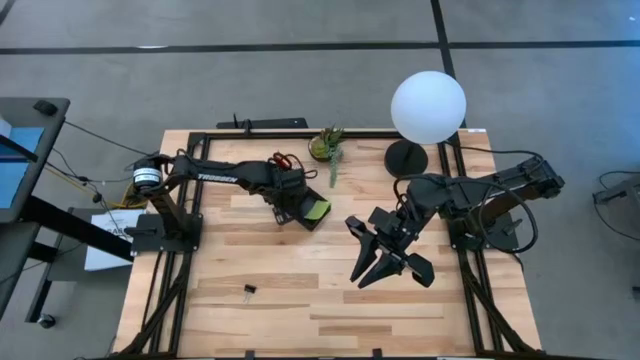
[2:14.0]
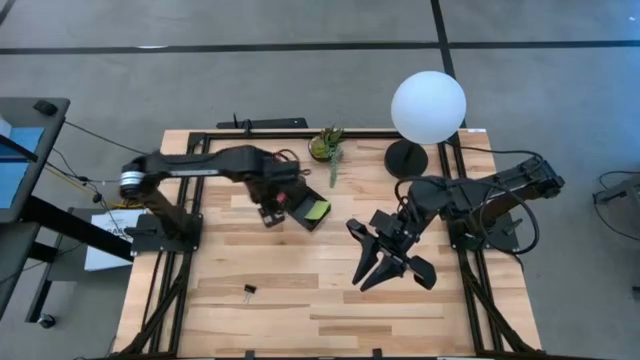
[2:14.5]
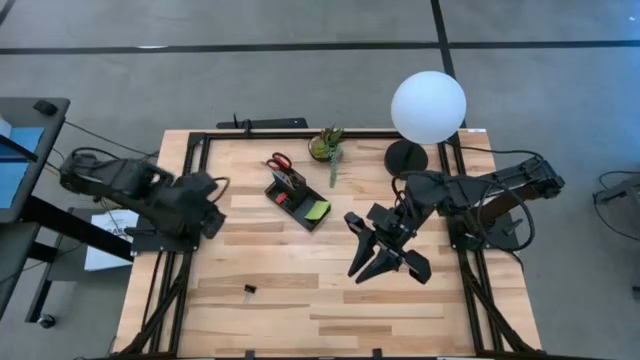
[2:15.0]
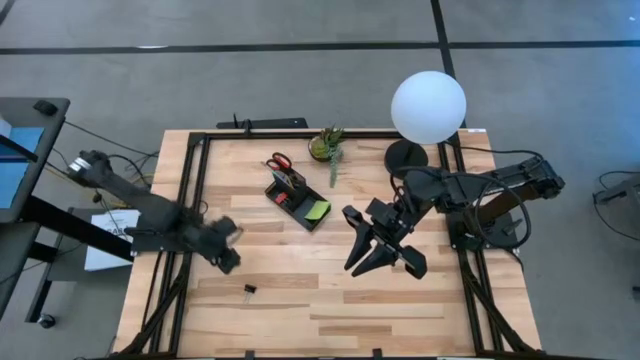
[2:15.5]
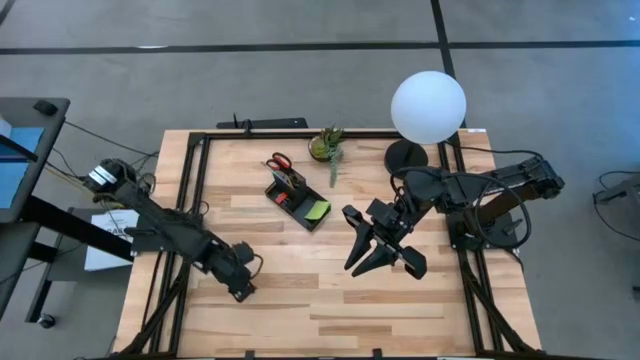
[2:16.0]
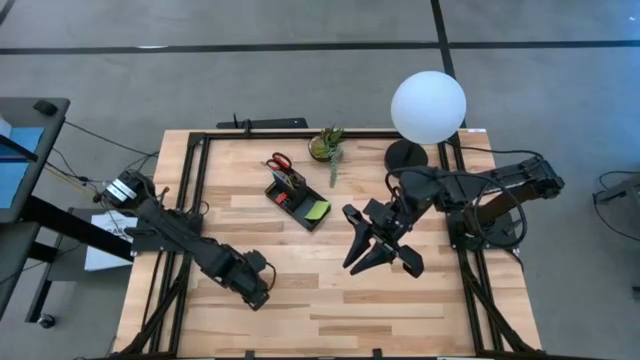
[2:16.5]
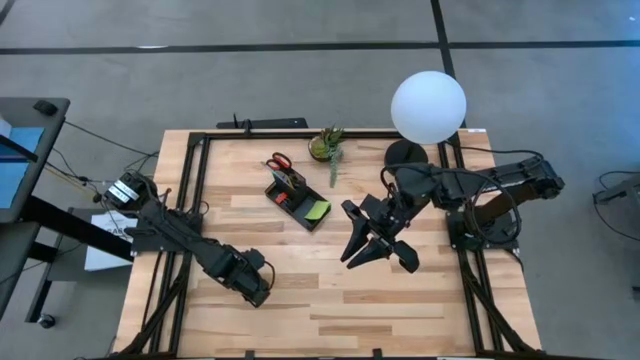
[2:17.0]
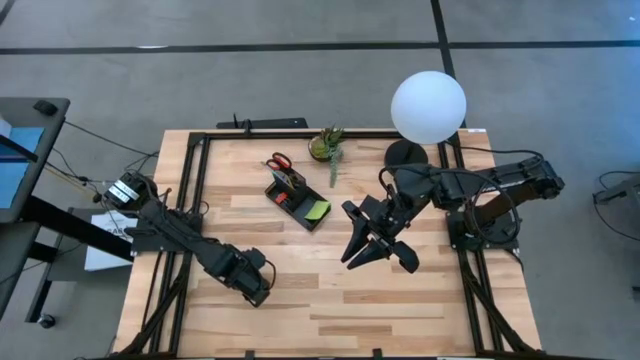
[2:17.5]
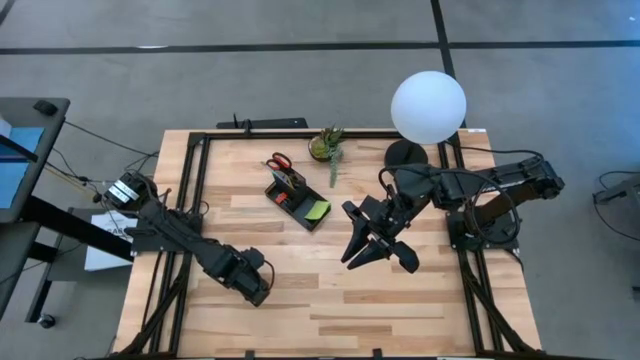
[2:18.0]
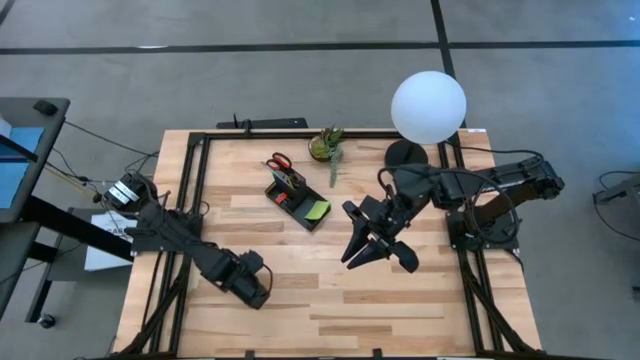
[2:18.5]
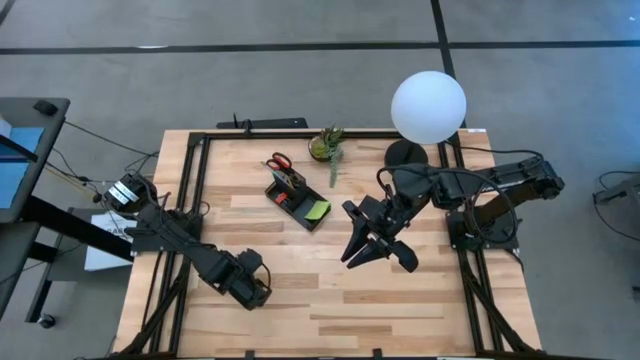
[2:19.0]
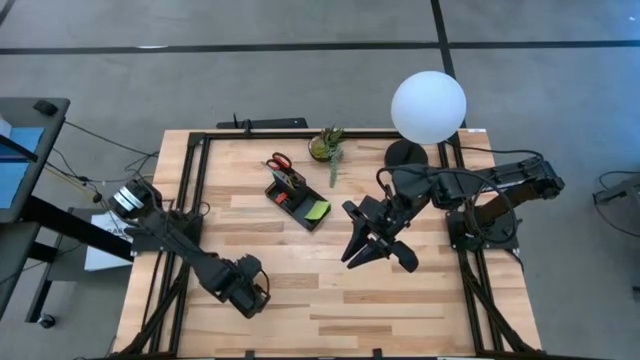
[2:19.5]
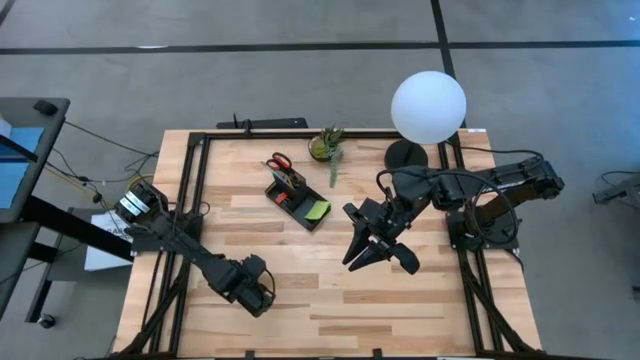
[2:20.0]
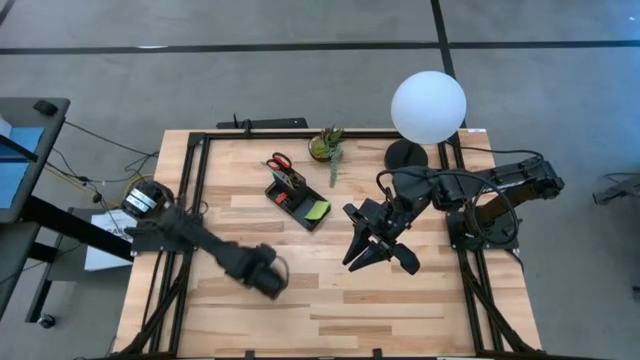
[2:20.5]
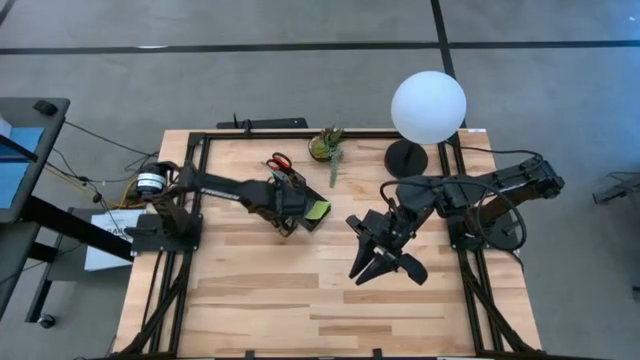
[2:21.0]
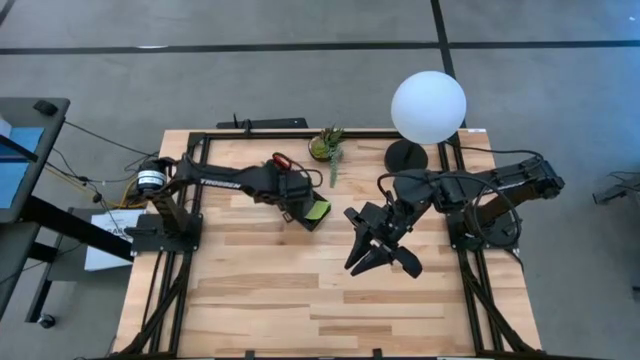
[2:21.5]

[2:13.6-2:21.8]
Task: Pick and place office supplies into organizer
Put the binder clip into the black desk organizer

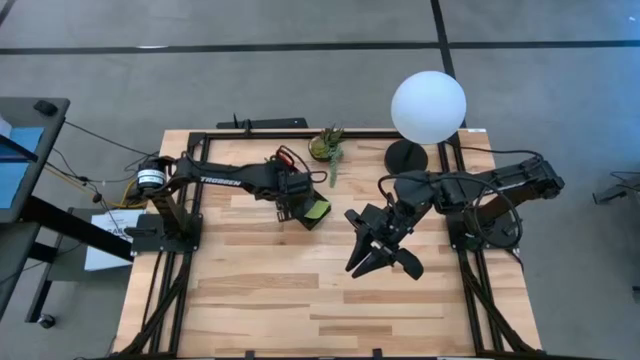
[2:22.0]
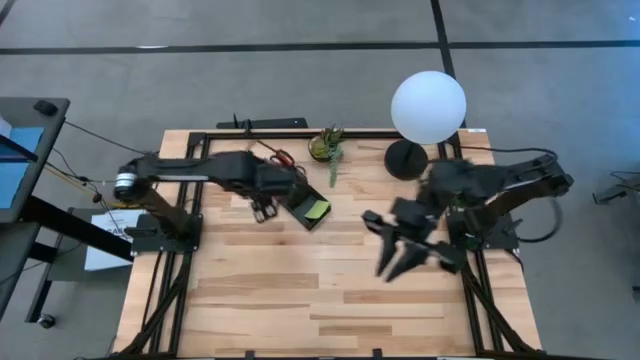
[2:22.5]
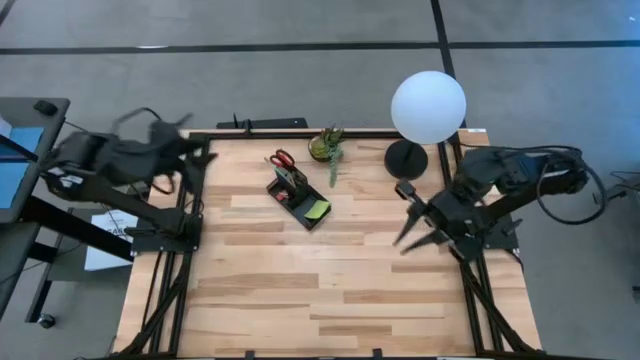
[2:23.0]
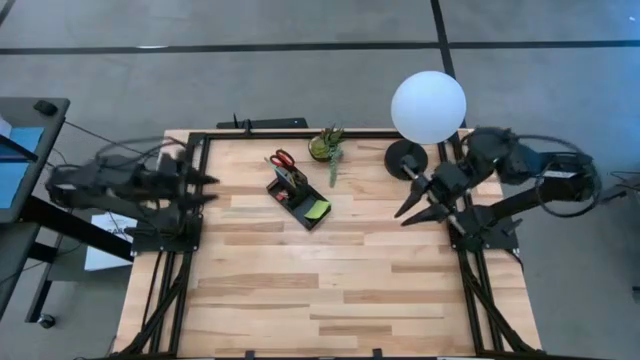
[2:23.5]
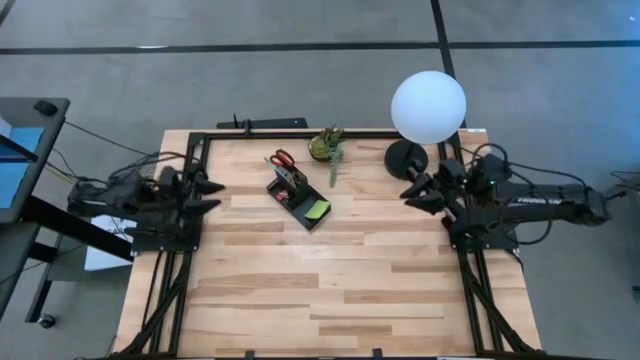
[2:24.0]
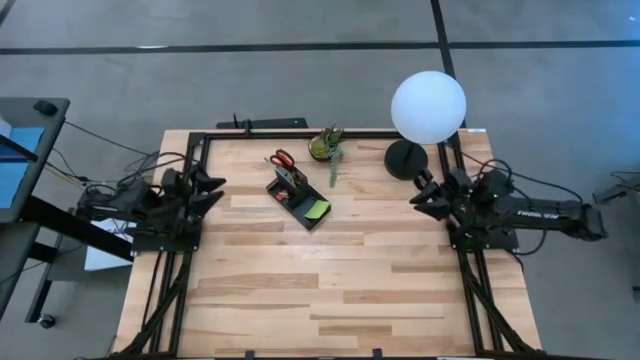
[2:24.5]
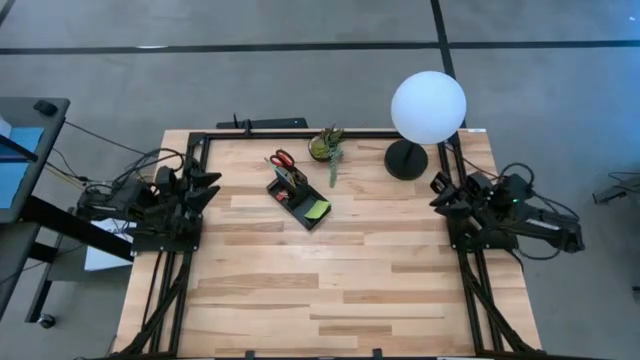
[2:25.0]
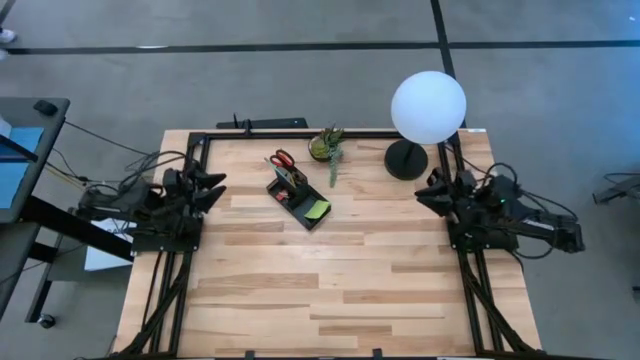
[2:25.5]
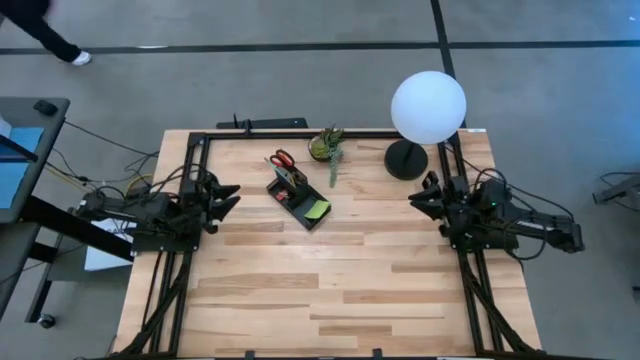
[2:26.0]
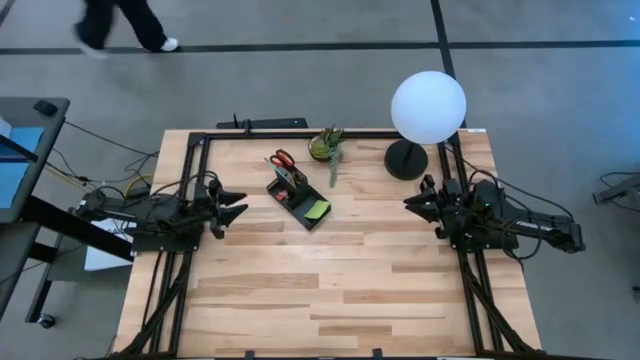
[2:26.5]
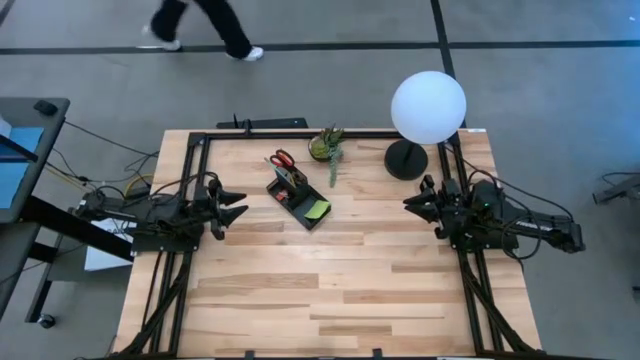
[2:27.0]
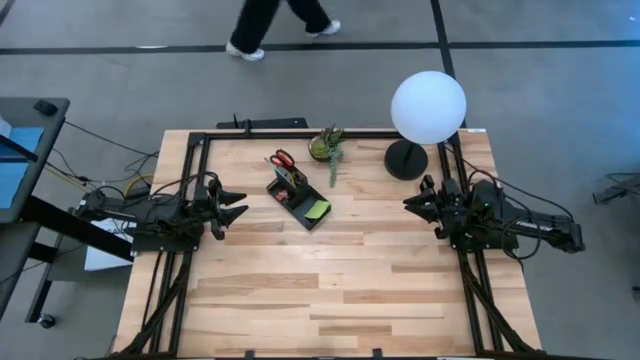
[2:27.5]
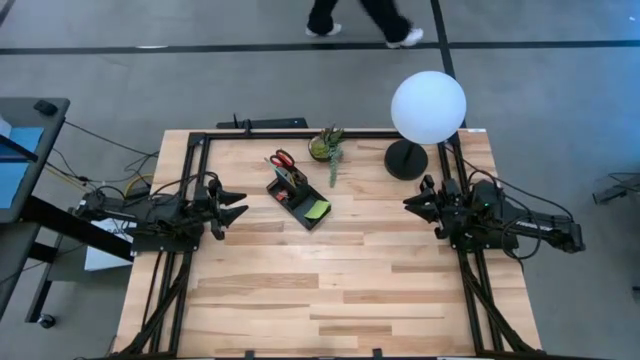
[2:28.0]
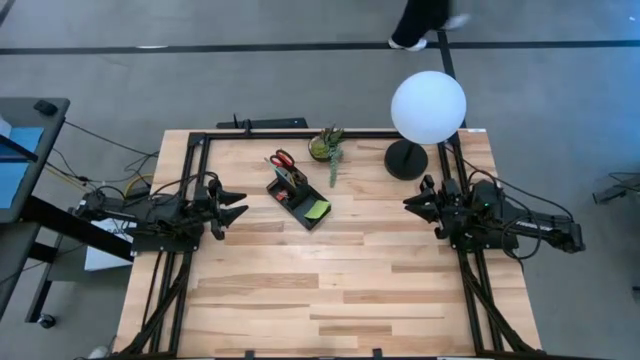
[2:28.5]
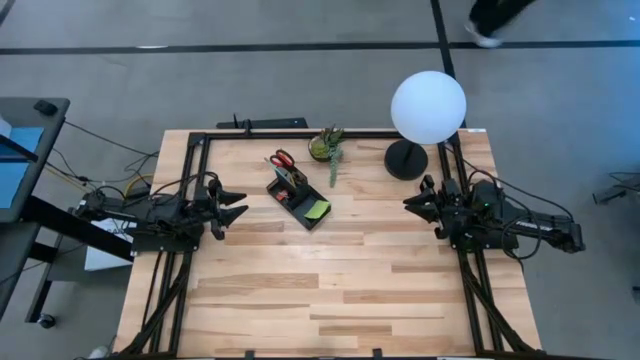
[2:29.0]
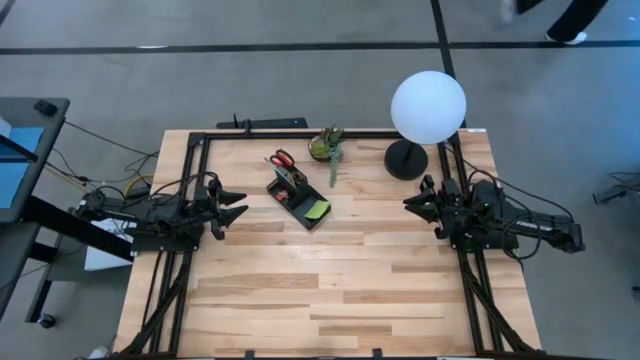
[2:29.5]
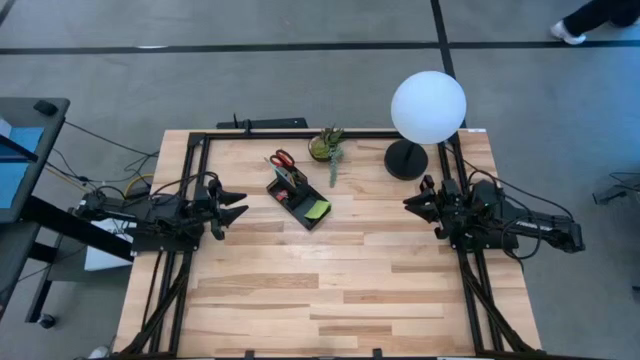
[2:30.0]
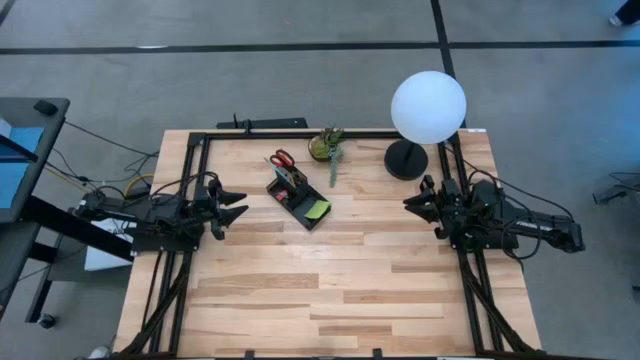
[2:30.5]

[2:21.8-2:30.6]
Return to Home Position

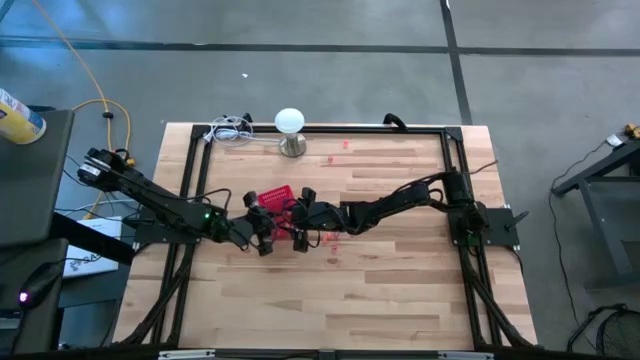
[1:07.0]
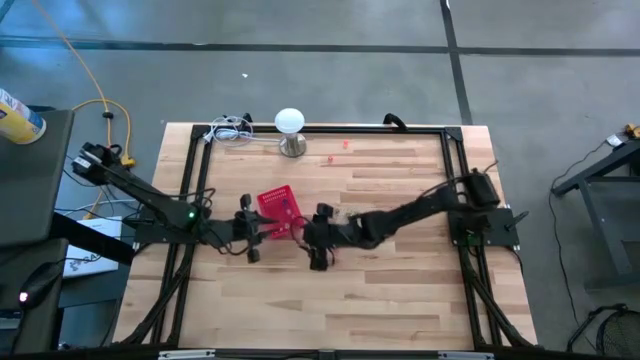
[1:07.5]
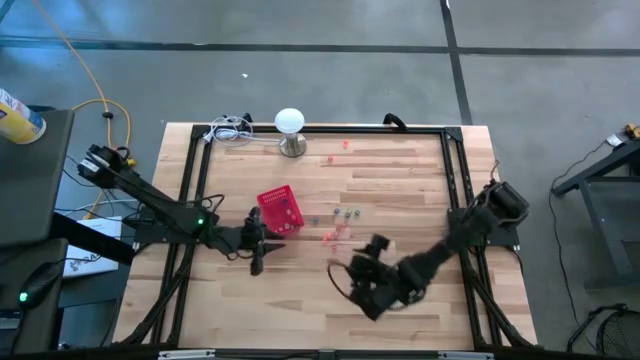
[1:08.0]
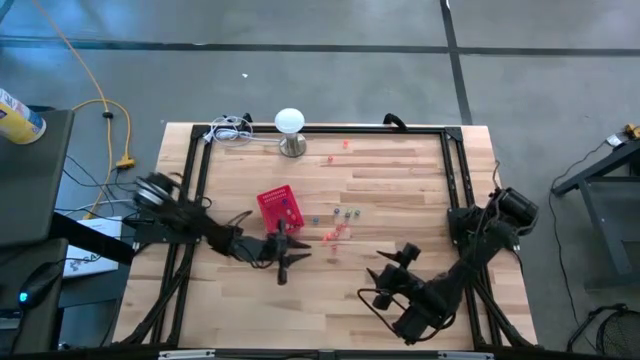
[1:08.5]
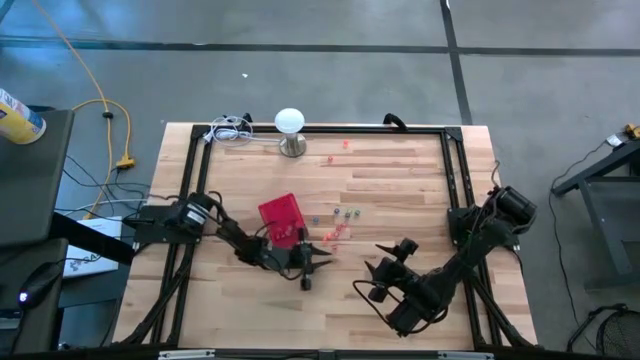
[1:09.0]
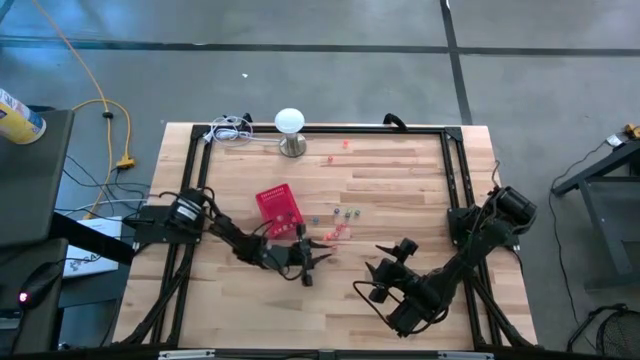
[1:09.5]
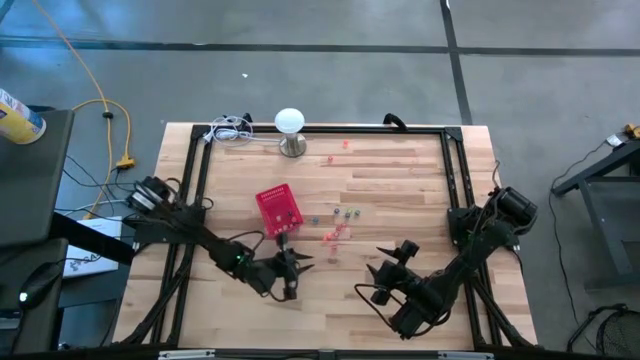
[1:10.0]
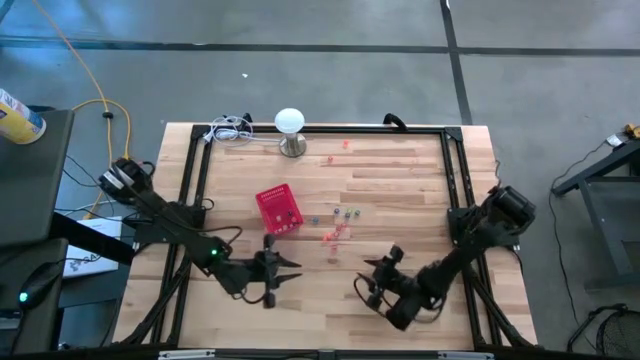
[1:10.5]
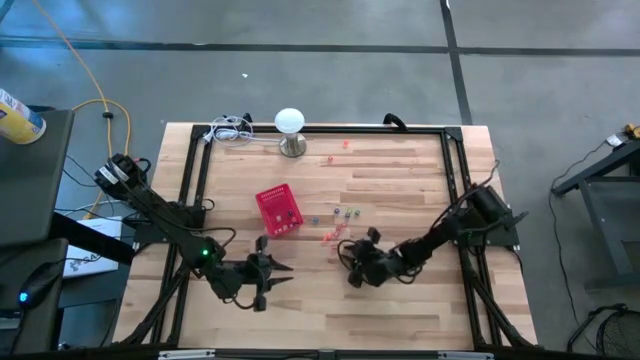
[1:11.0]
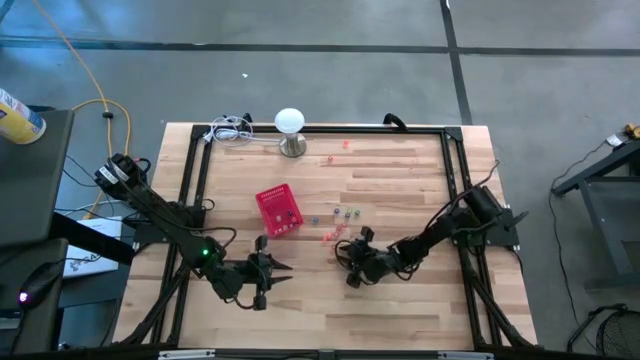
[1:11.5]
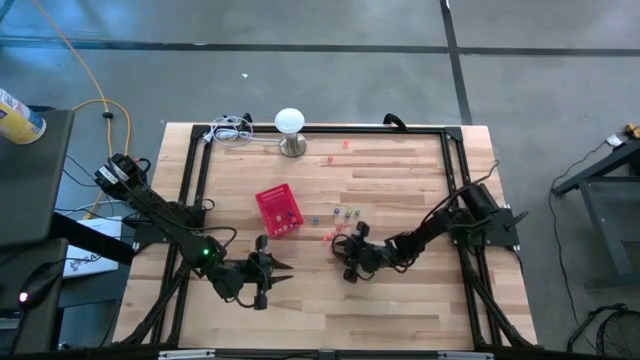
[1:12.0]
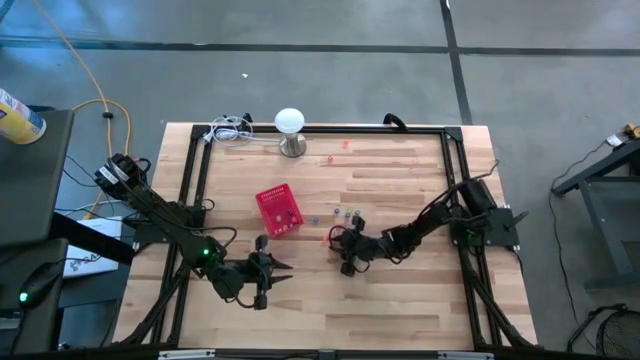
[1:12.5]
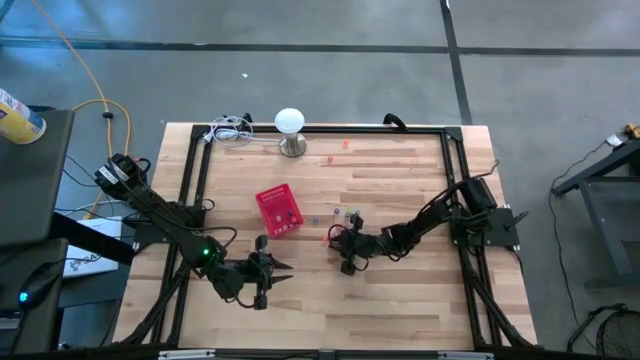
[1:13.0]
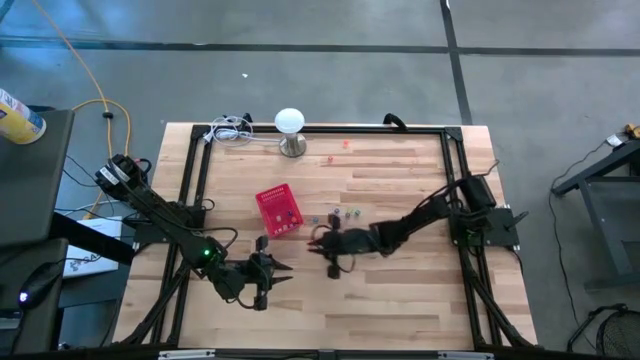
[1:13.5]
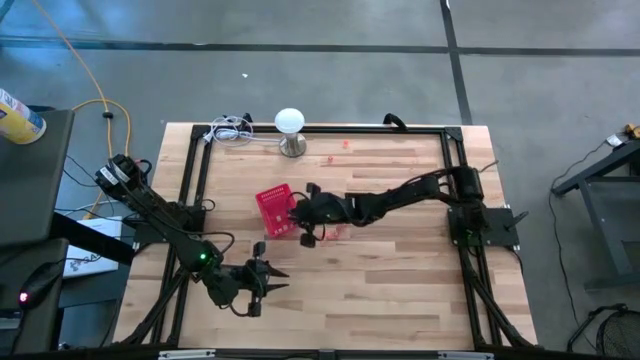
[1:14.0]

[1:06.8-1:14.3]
Task: Pick & Place Dice
Put the pink die into the red basket
